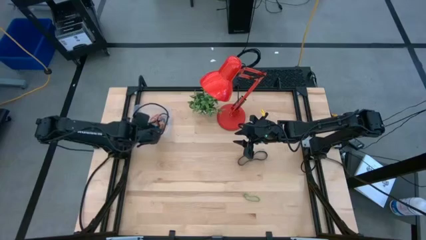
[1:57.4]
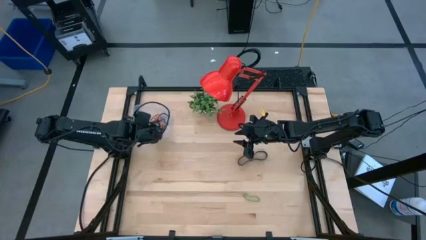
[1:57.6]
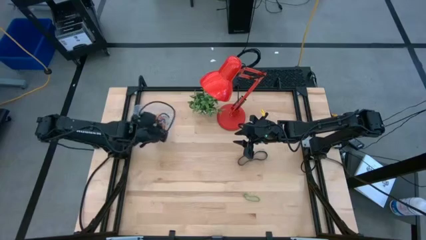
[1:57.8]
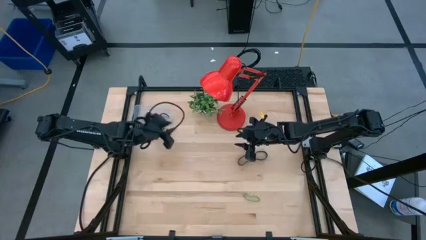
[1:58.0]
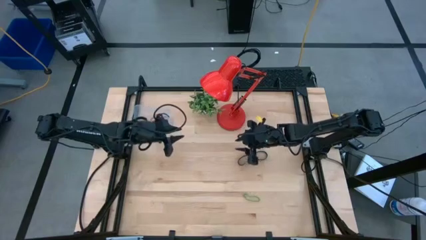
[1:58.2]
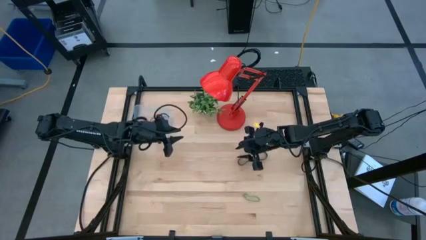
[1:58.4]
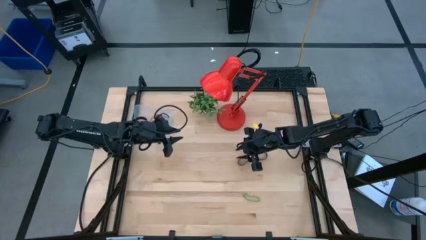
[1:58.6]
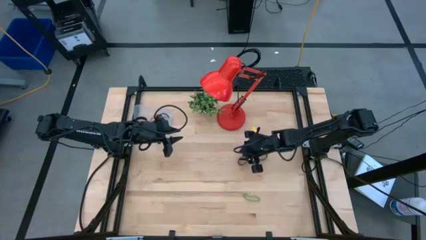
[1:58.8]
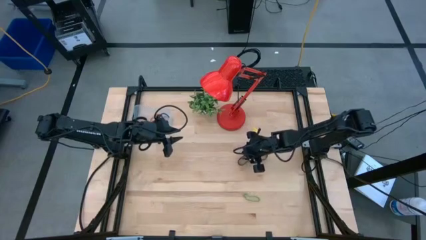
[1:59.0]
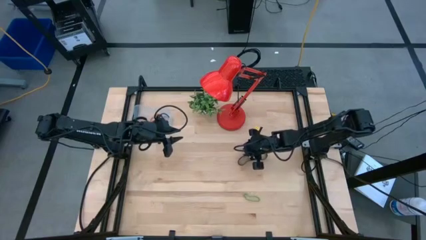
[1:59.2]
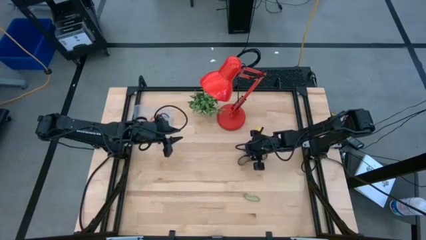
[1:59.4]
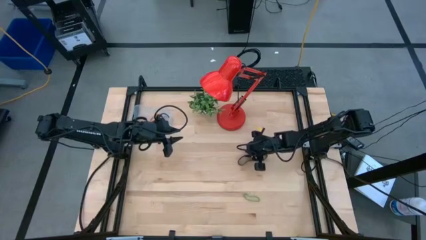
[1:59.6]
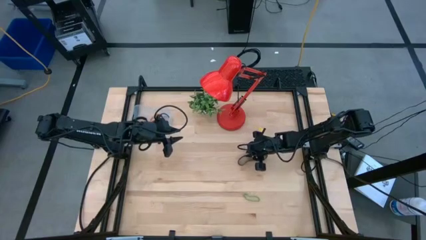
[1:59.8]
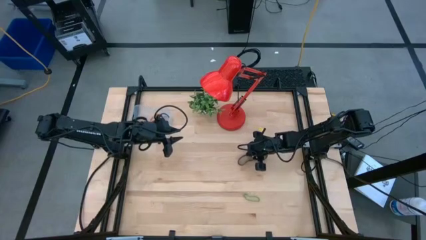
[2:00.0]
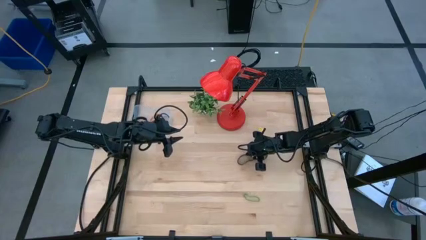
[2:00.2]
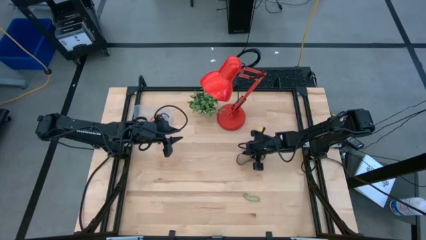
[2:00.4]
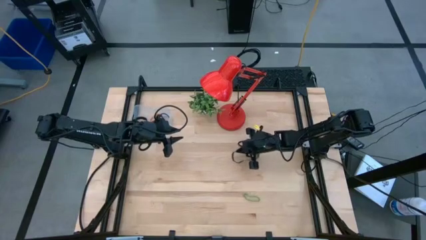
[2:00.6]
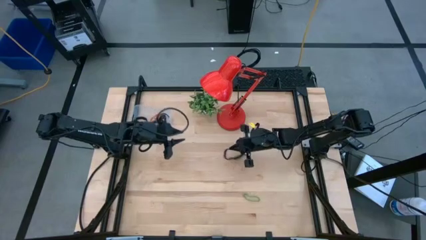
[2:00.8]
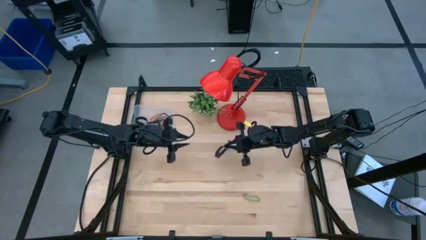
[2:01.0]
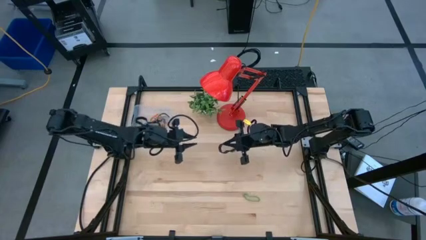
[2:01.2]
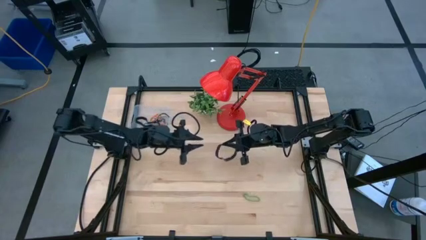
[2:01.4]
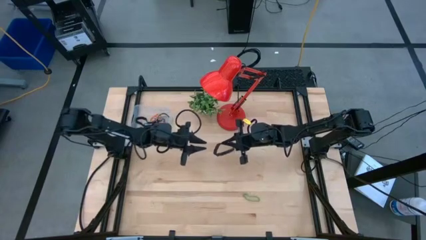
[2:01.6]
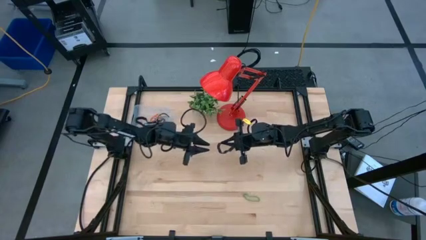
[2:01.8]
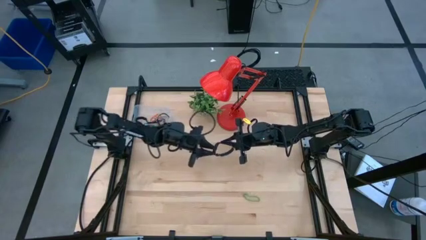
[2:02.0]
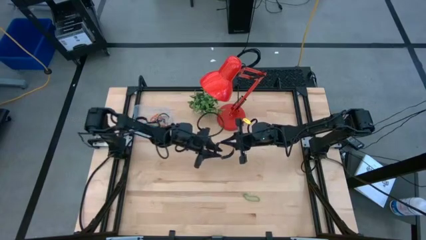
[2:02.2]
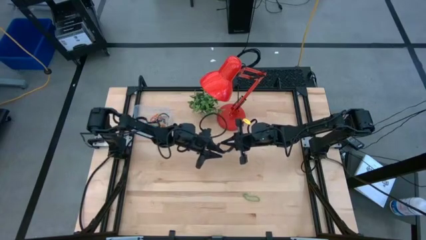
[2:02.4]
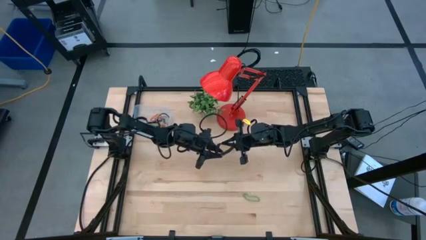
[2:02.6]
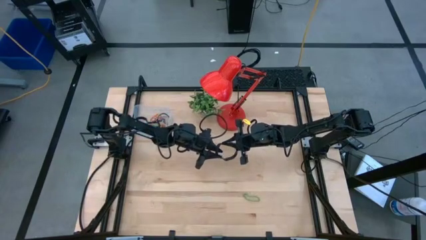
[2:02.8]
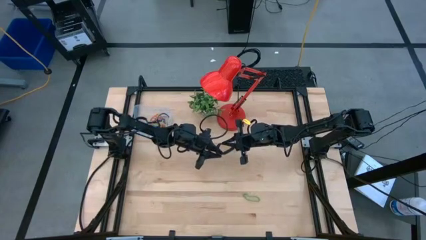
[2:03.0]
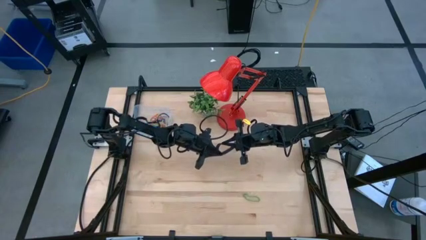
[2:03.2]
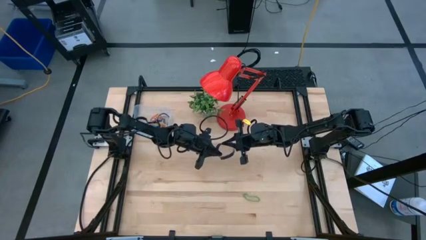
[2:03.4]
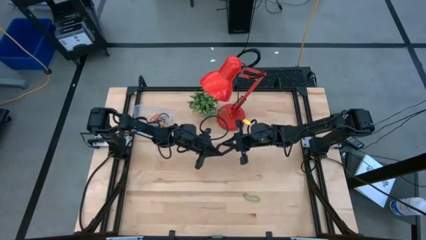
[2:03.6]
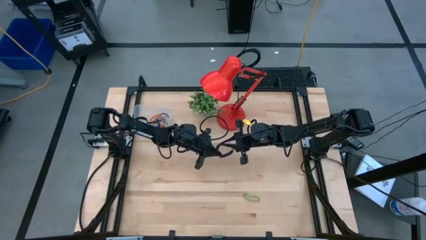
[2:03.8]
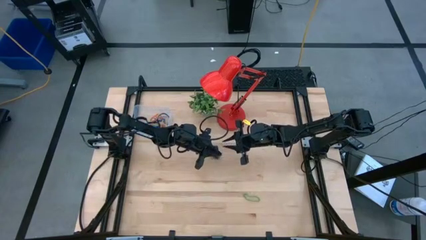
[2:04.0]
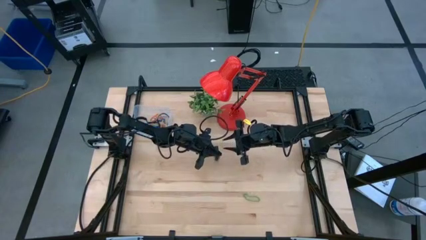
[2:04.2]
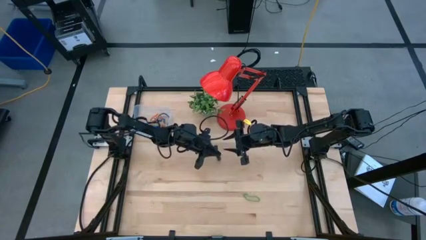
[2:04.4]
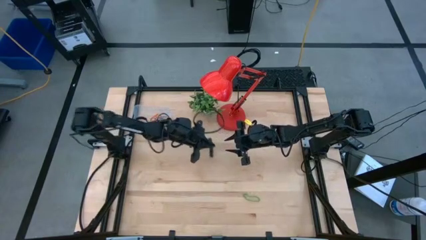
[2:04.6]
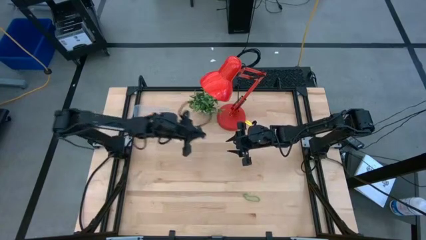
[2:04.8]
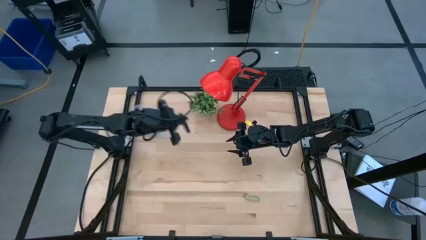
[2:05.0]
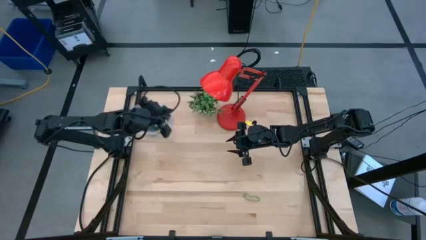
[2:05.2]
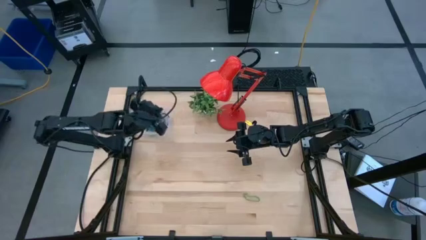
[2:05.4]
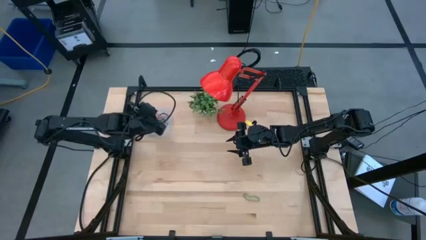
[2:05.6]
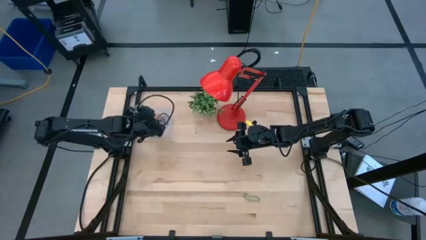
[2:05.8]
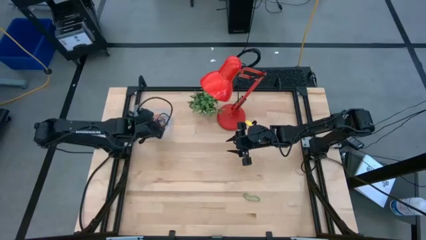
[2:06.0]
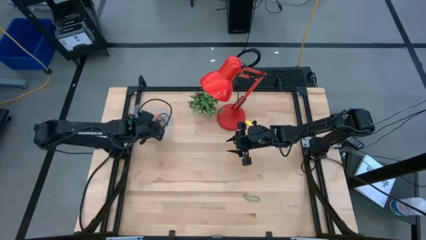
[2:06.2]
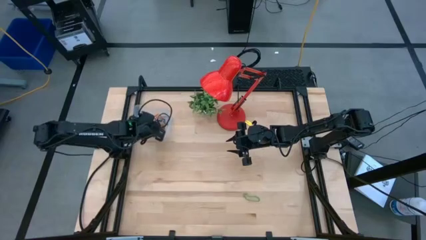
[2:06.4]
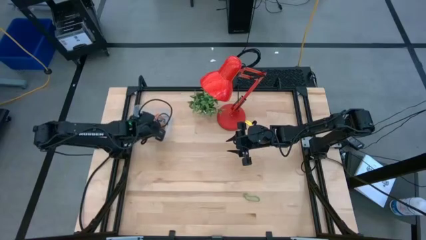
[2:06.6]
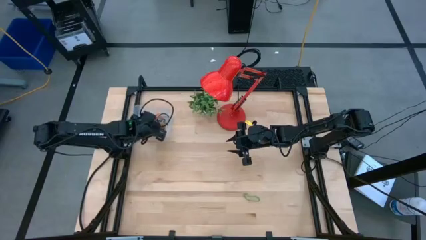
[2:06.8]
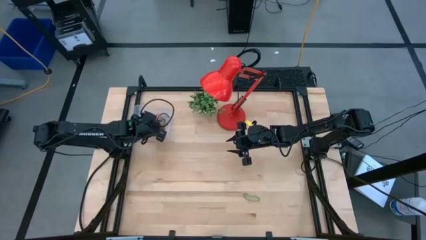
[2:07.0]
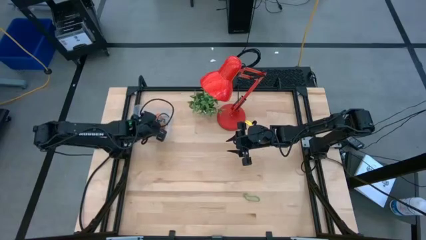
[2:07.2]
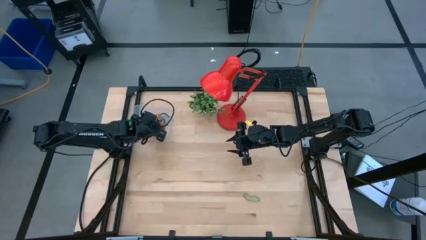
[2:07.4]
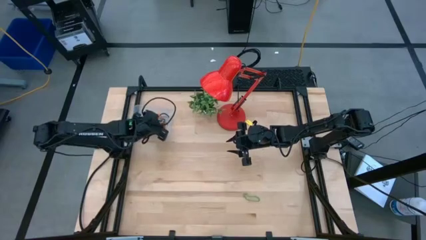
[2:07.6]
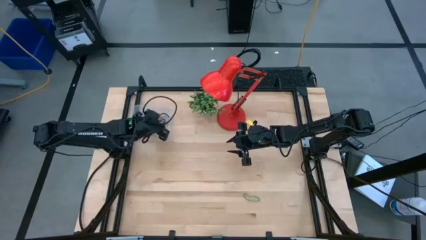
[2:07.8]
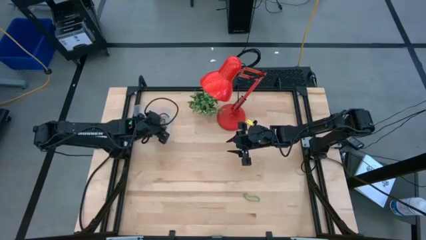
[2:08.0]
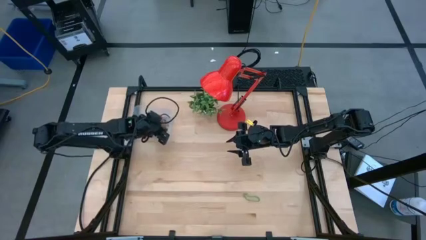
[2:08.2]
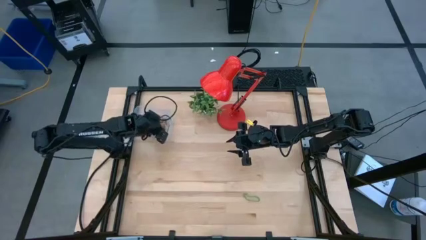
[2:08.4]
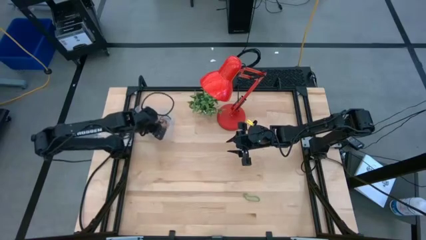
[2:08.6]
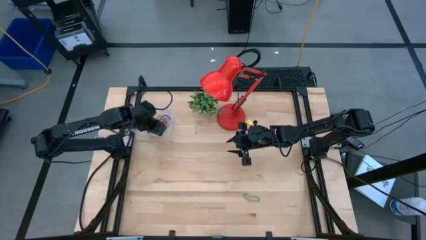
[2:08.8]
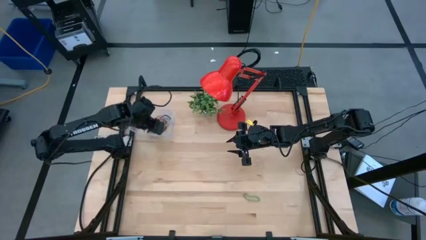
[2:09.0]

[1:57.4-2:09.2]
Task: Pick and place rubber bands into bin
Put the black rubber band into the transparent bin
